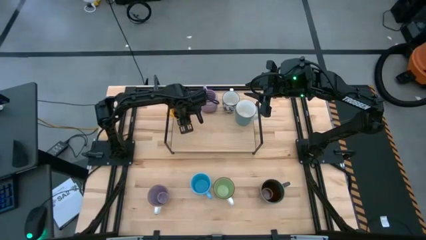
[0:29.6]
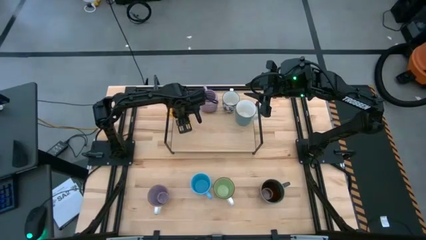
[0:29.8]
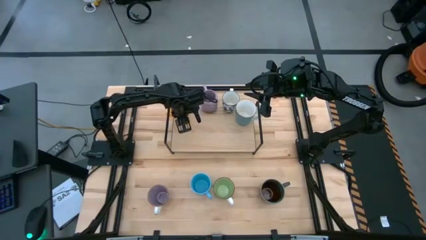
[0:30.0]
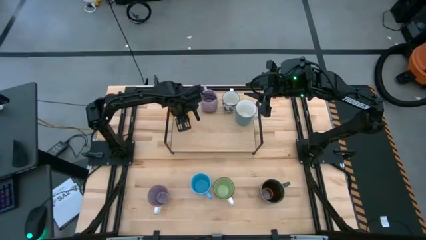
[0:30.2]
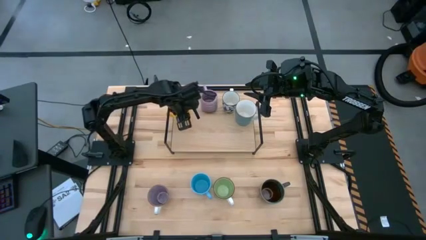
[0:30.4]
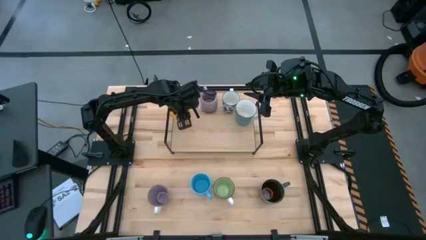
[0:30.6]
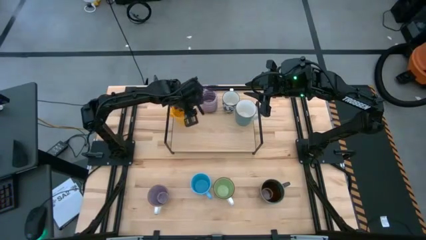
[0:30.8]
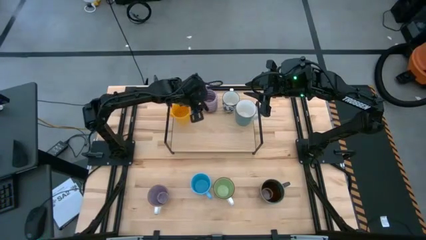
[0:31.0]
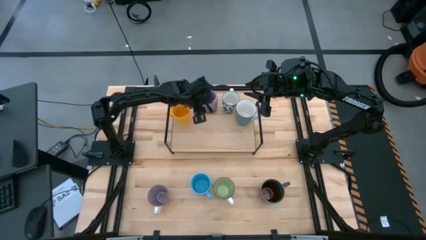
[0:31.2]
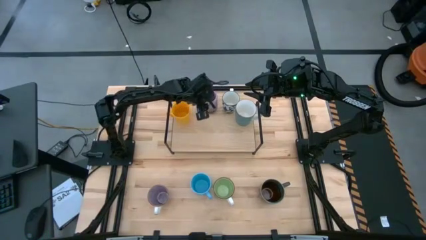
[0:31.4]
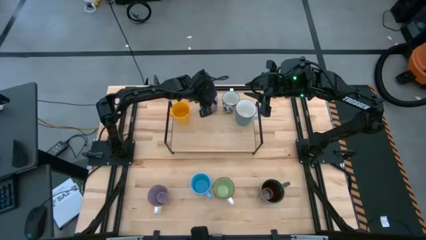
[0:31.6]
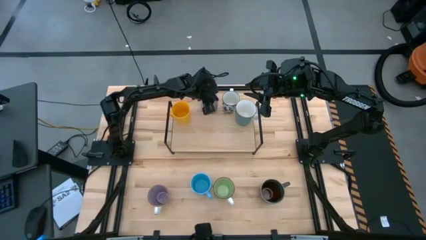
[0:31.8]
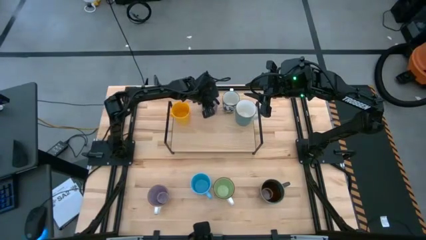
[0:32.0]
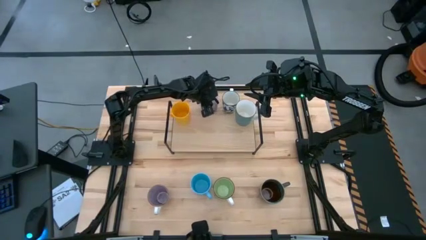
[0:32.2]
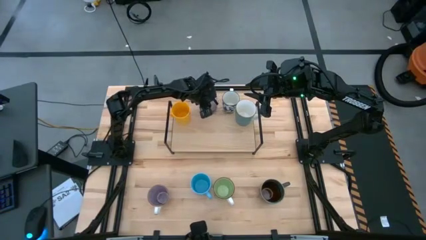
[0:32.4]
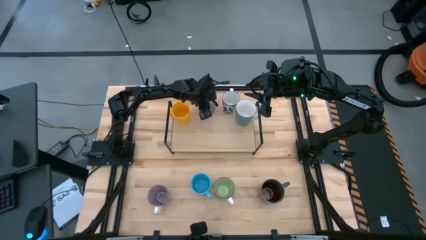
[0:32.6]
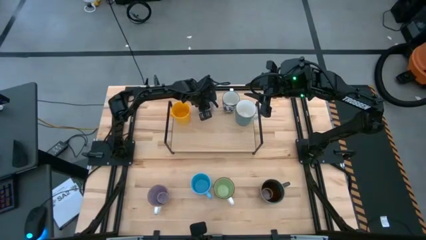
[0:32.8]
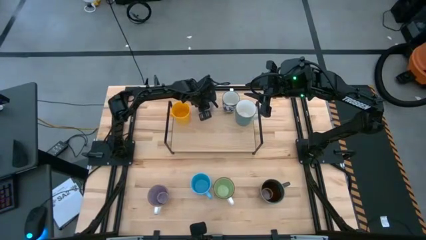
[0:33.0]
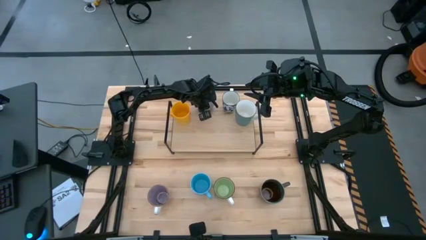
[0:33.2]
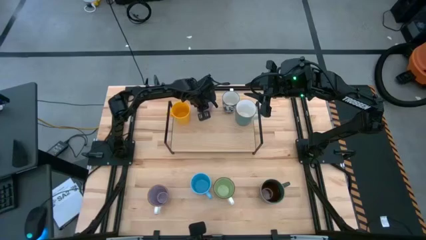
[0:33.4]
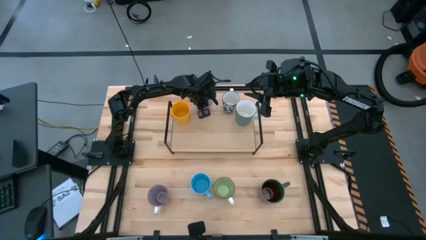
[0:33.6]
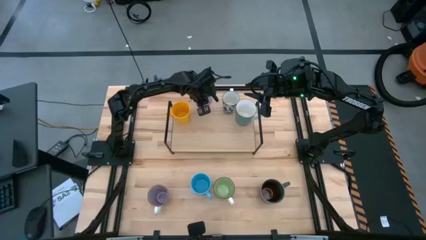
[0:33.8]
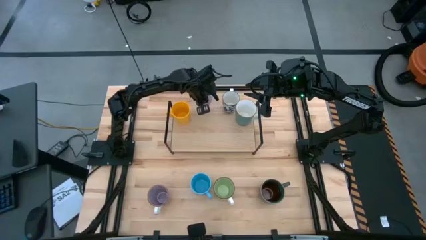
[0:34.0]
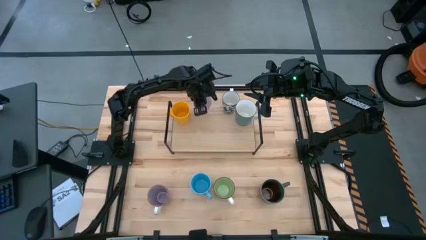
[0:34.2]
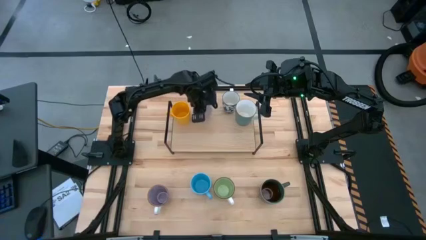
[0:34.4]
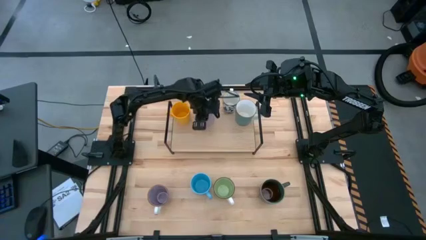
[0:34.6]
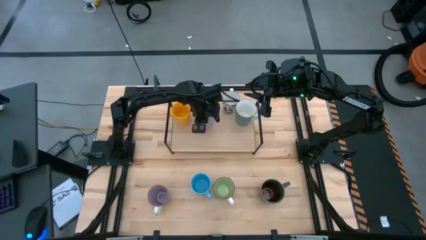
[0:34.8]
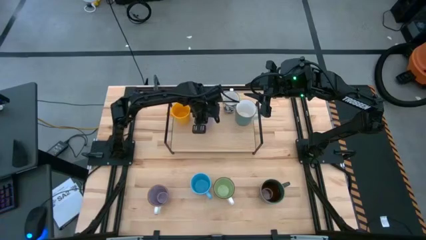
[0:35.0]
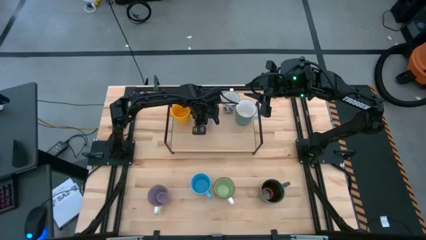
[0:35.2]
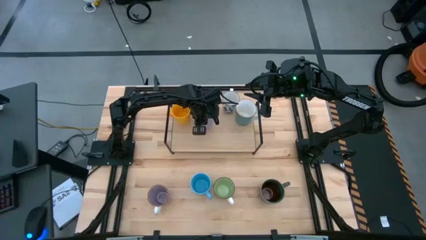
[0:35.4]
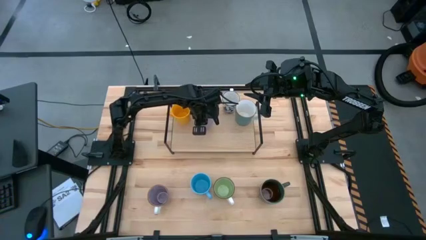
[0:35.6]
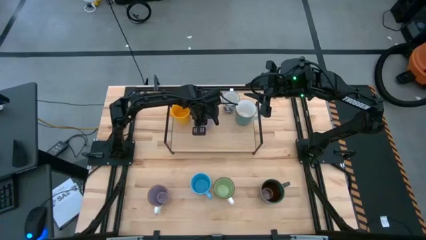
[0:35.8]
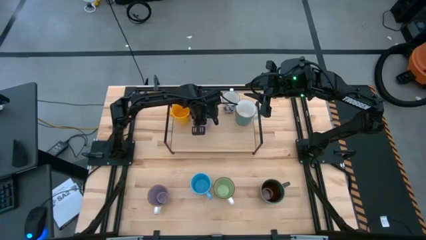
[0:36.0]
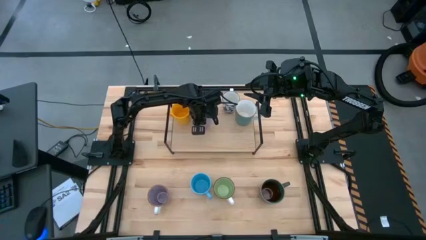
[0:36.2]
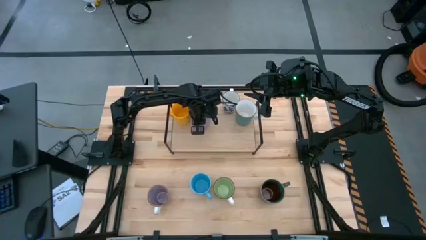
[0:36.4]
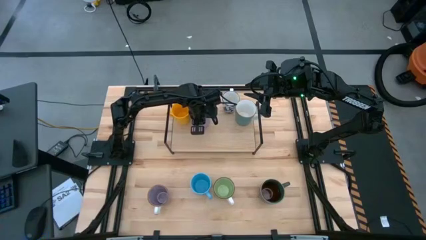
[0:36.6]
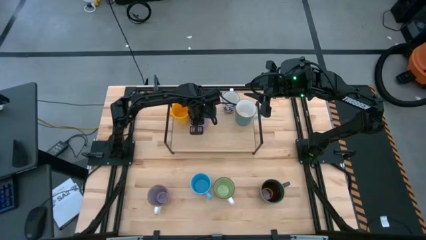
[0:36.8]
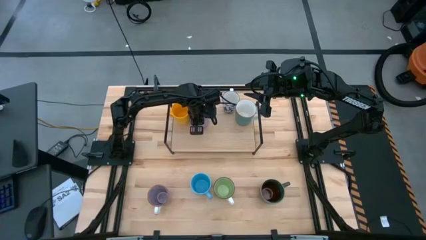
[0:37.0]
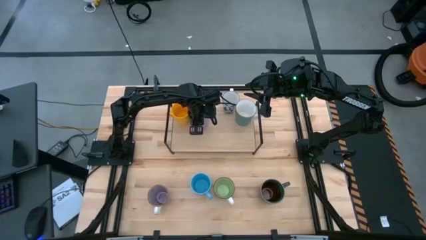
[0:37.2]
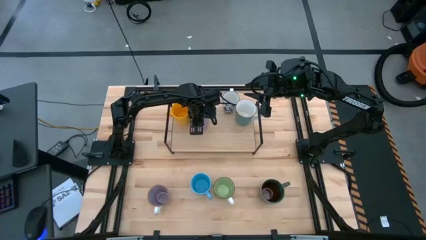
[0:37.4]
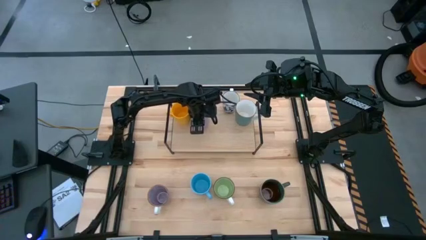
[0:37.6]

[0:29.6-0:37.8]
Task: Place coffee mugs
Put the top purple mug on the shelf

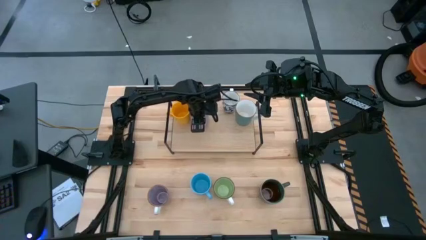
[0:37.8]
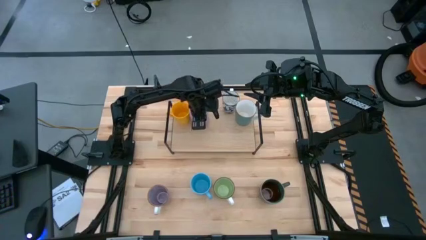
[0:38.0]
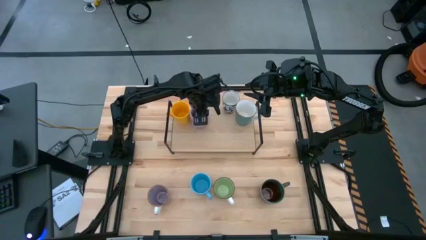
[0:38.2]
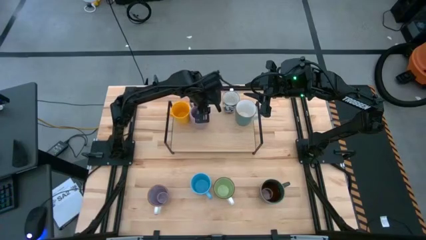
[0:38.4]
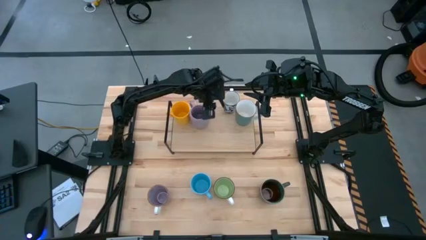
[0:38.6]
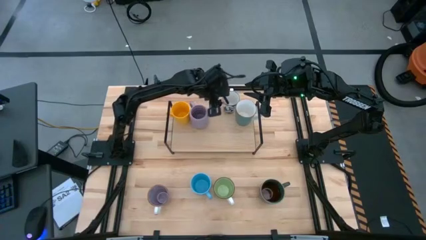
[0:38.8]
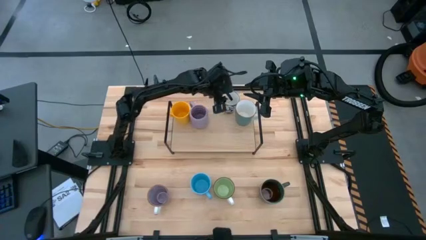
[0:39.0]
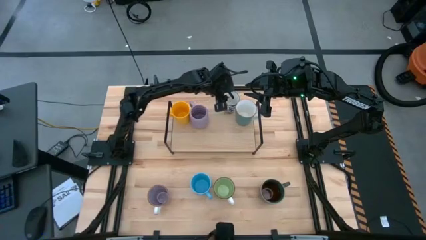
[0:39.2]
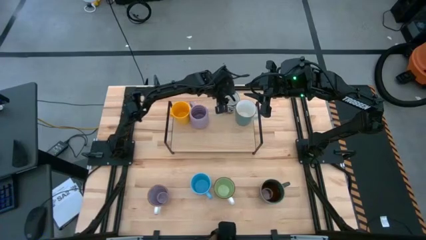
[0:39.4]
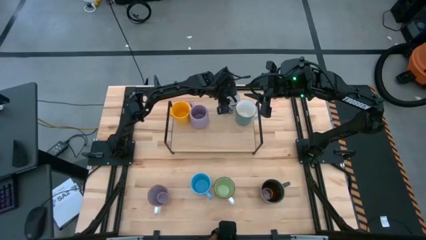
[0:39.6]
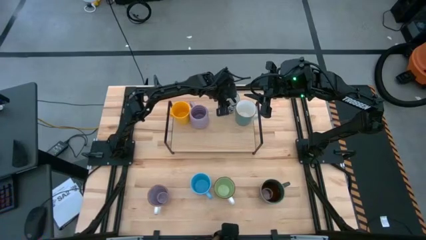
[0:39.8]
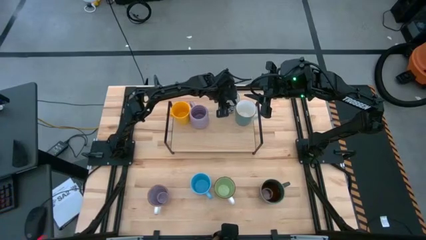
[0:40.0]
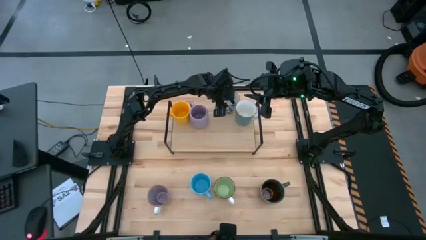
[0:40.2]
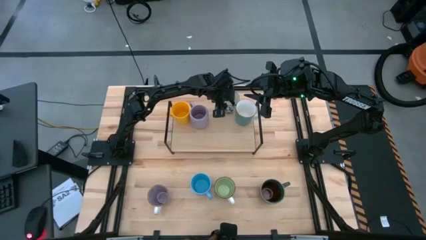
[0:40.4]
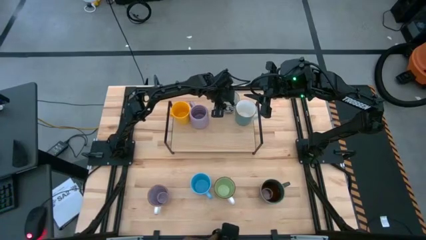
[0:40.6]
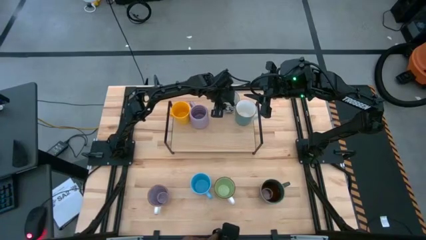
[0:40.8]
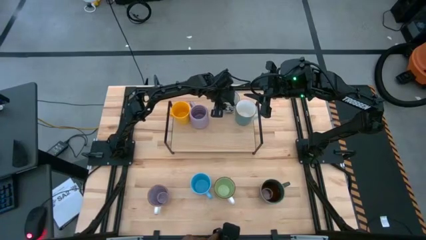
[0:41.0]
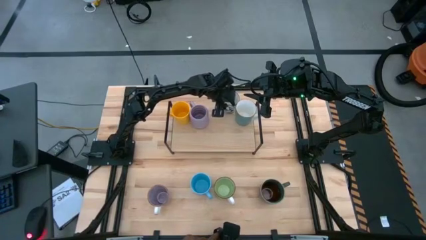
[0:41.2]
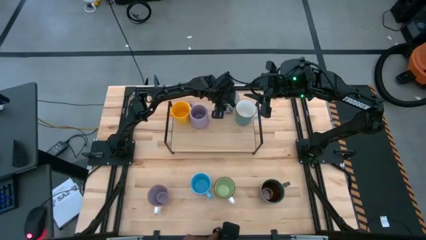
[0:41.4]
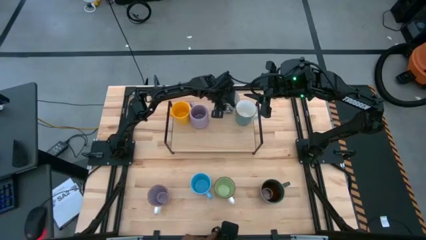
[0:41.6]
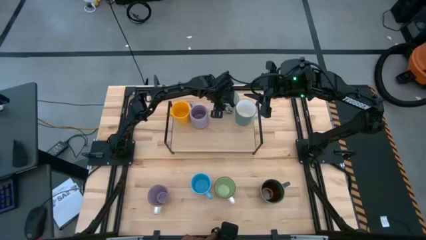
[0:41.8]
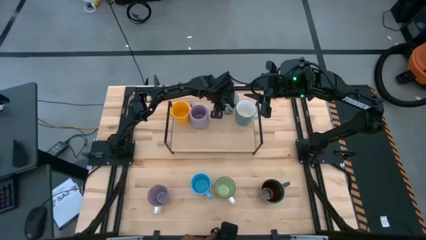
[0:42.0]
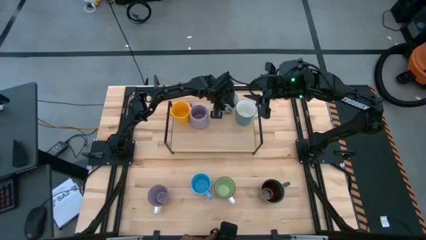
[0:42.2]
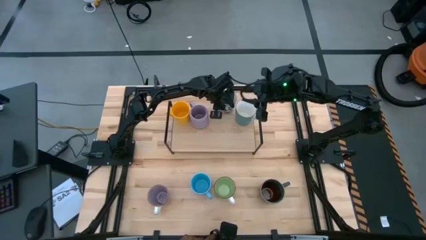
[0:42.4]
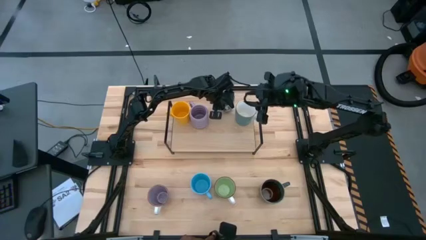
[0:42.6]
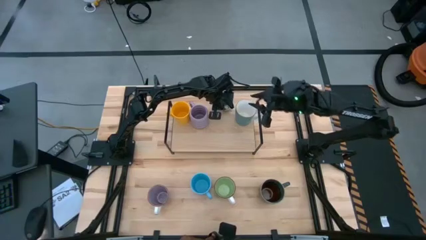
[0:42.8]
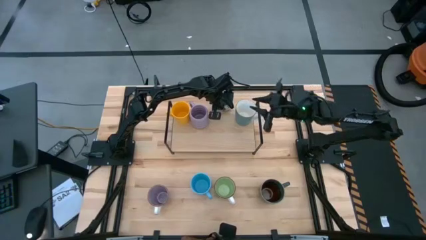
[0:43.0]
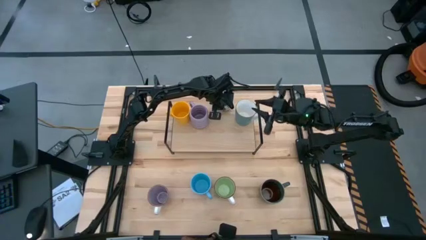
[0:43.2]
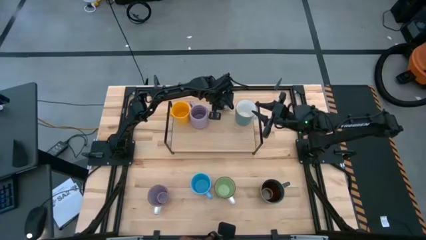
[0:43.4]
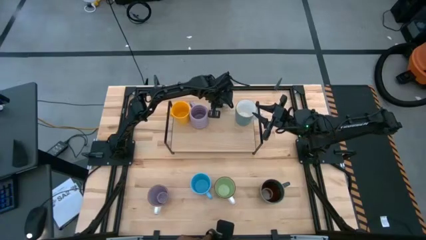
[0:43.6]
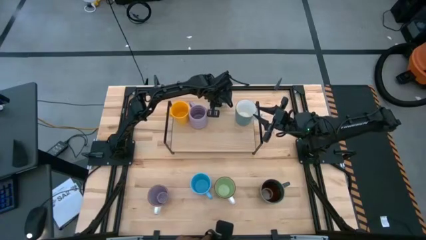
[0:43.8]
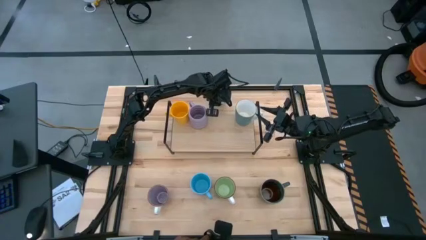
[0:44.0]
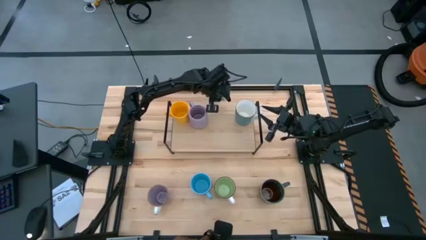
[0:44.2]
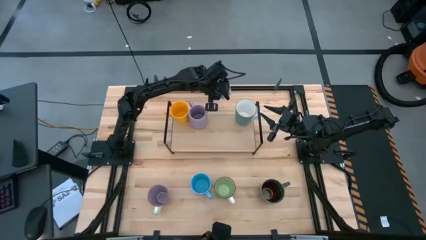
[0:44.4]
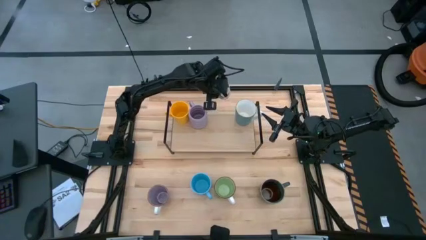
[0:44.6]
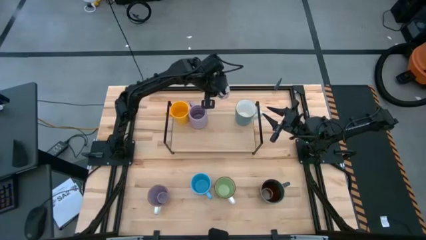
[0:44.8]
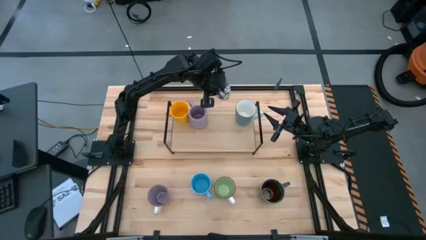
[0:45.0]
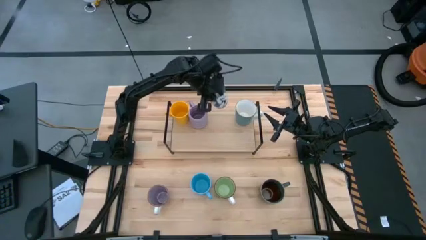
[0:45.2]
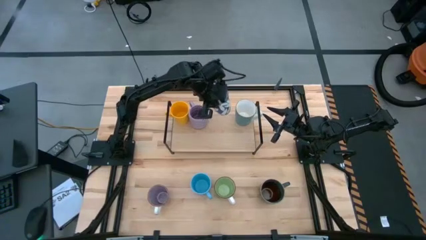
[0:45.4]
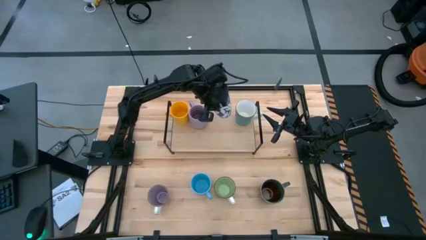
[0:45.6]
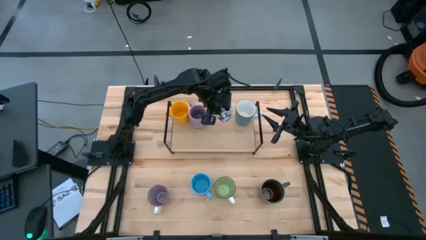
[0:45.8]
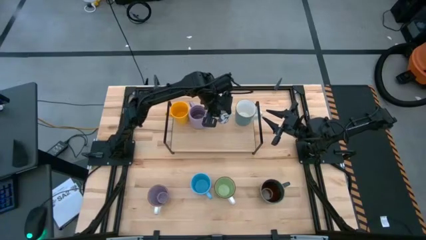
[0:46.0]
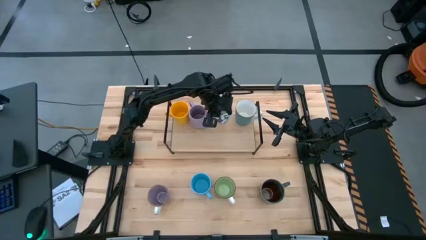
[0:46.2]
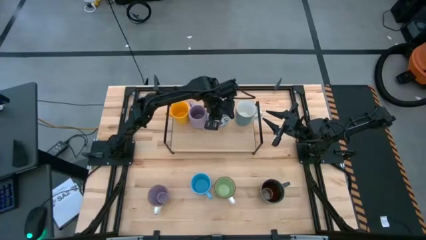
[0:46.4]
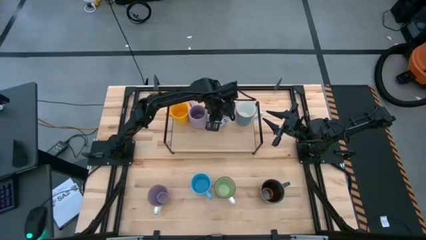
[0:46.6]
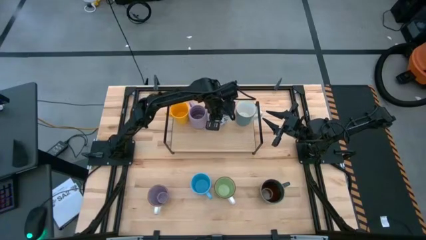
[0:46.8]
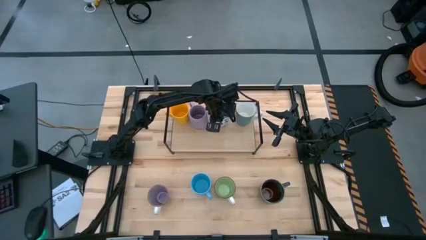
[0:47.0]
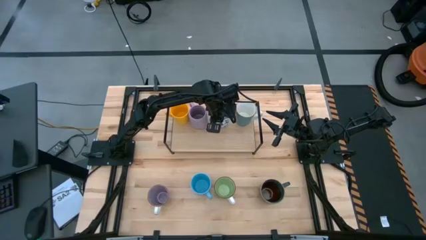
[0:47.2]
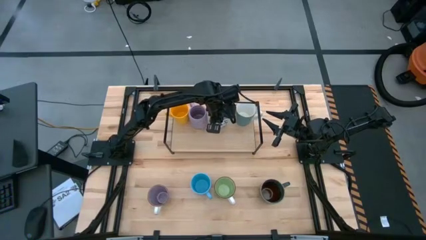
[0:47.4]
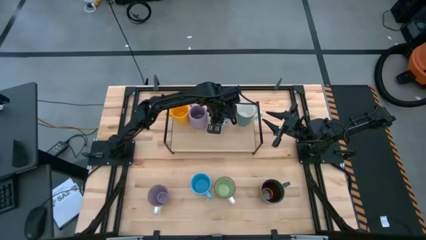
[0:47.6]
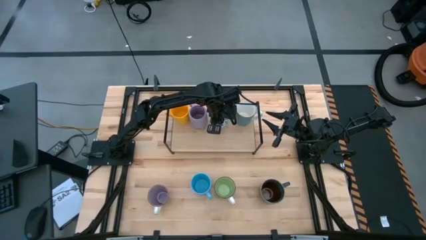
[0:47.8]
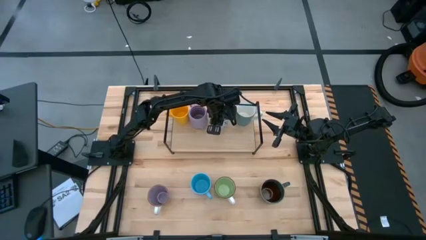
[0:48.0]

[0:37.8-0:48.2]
Put the blue white mug onto the shelf
